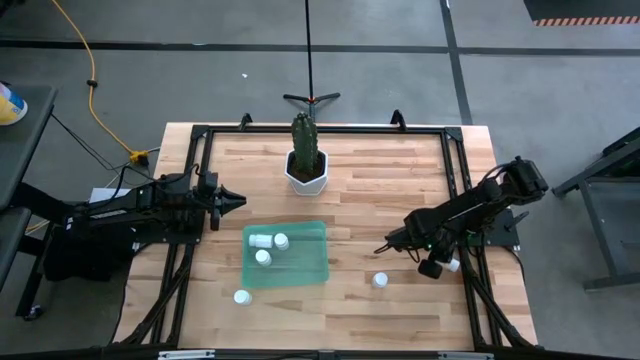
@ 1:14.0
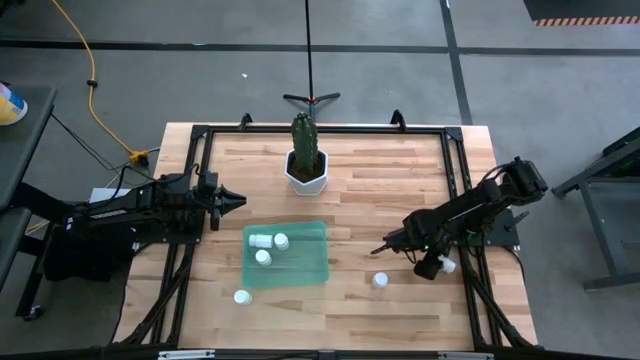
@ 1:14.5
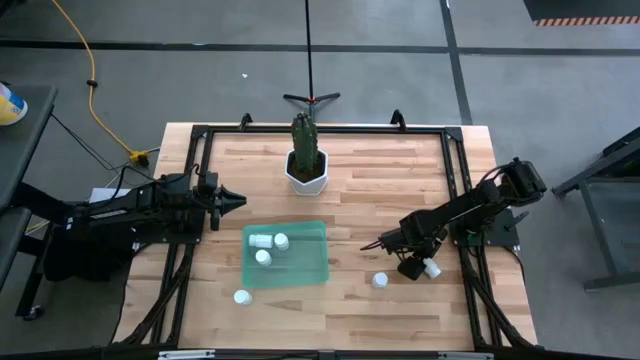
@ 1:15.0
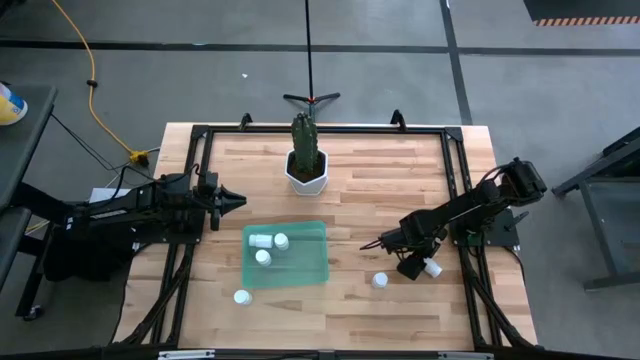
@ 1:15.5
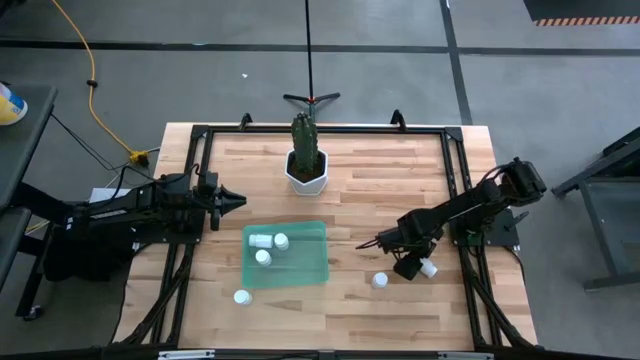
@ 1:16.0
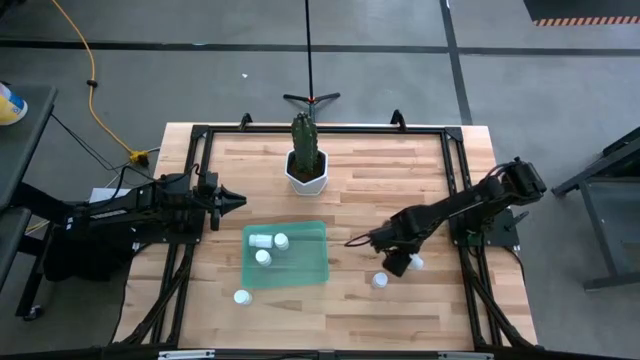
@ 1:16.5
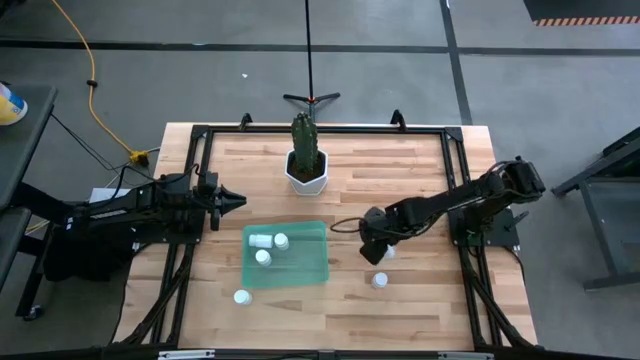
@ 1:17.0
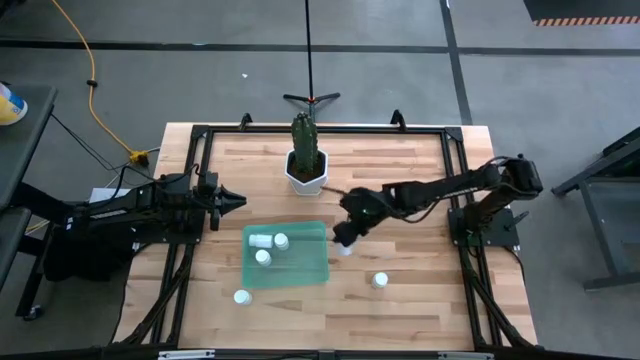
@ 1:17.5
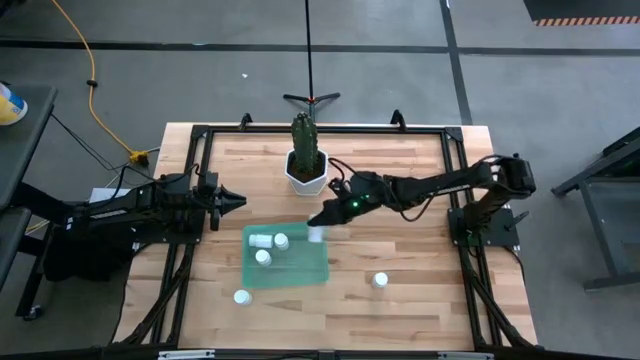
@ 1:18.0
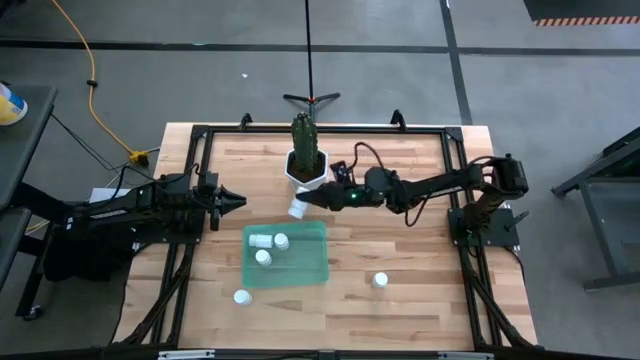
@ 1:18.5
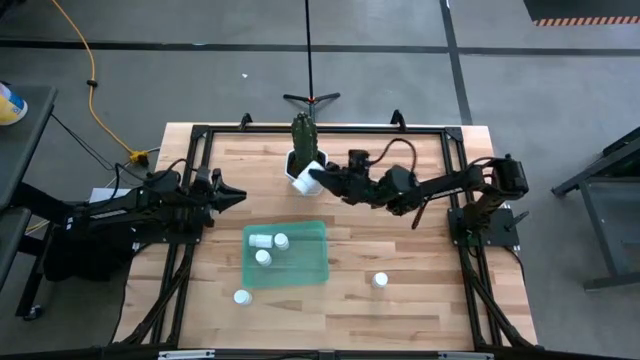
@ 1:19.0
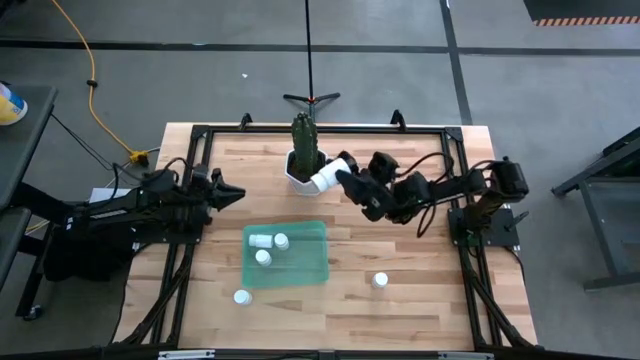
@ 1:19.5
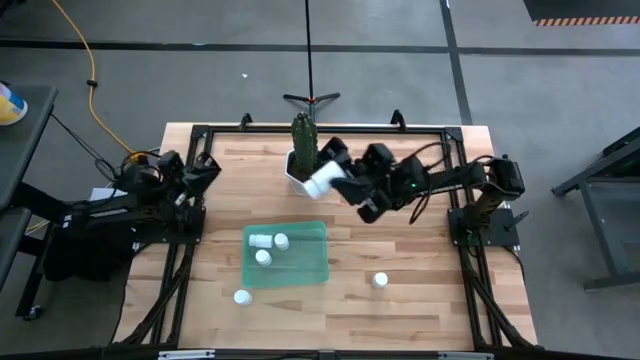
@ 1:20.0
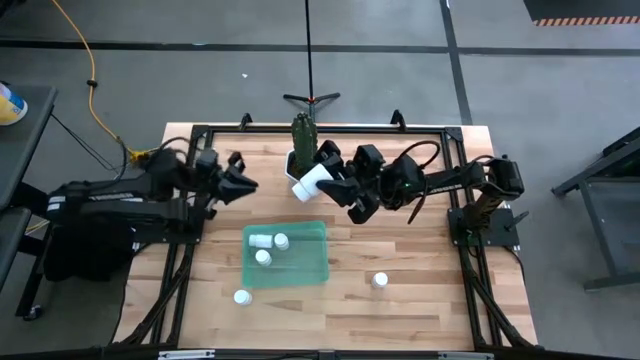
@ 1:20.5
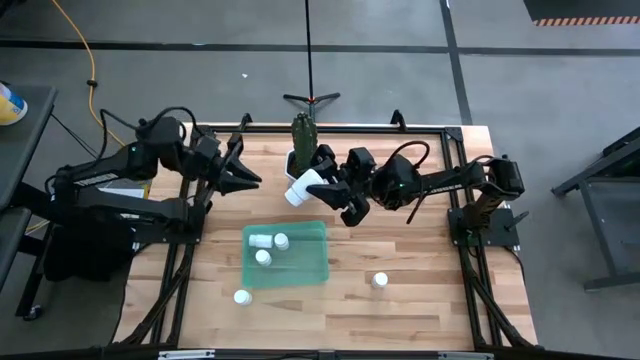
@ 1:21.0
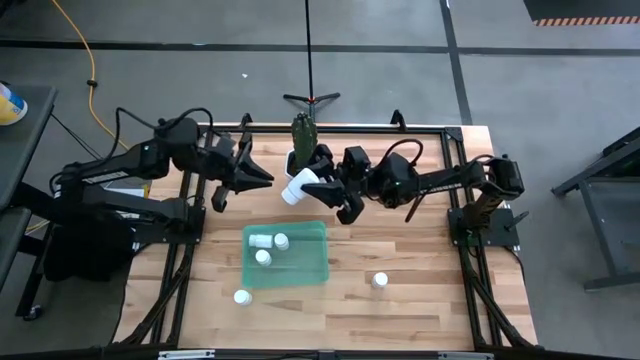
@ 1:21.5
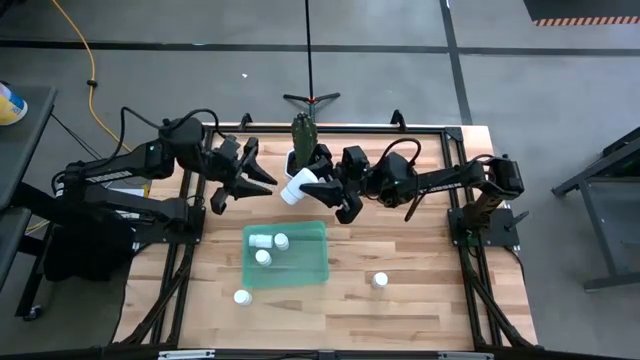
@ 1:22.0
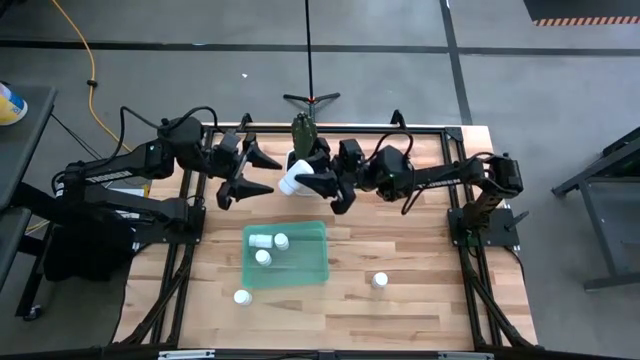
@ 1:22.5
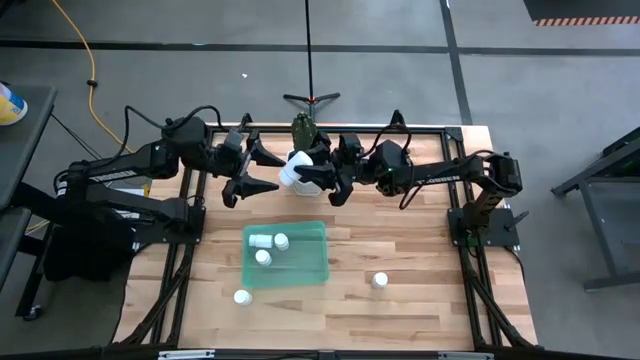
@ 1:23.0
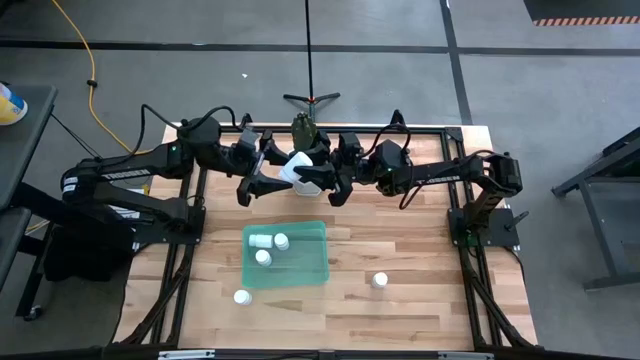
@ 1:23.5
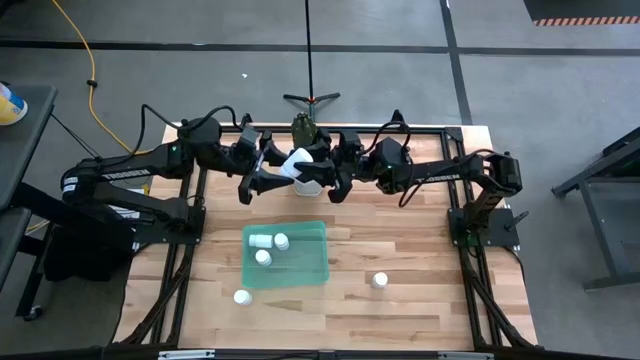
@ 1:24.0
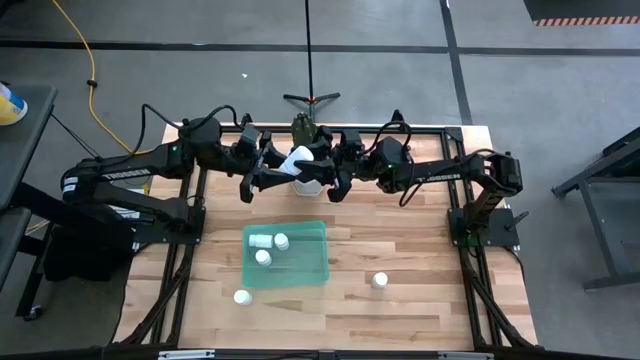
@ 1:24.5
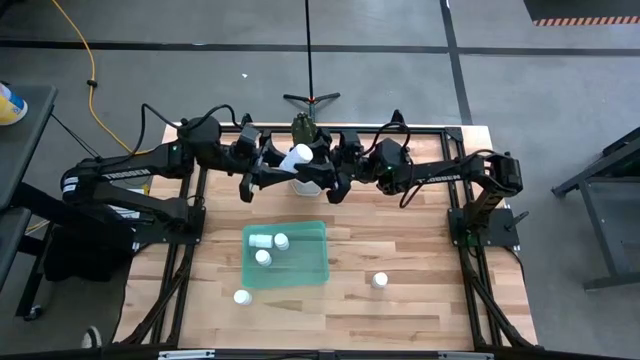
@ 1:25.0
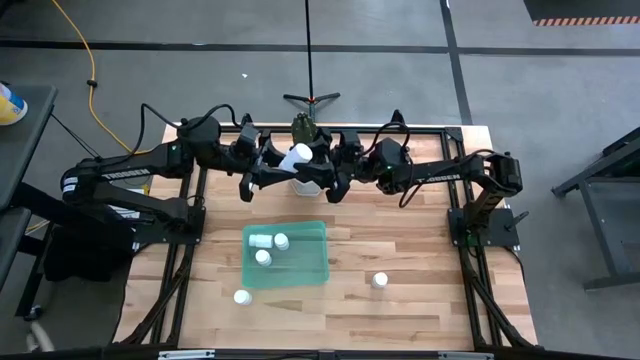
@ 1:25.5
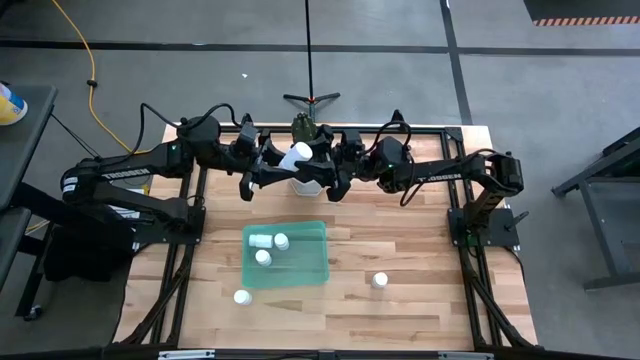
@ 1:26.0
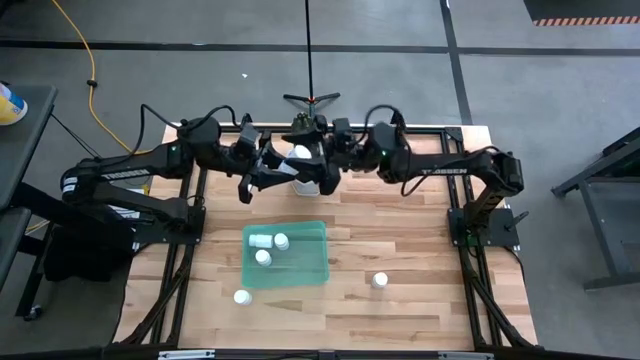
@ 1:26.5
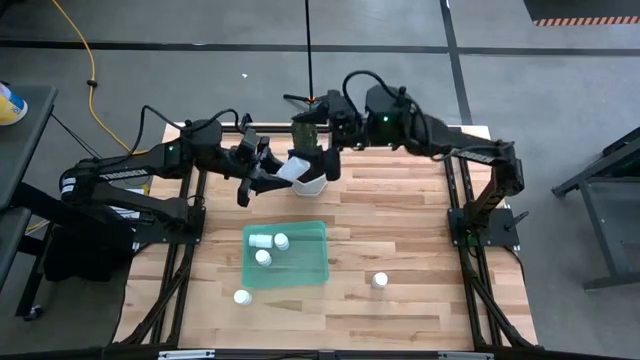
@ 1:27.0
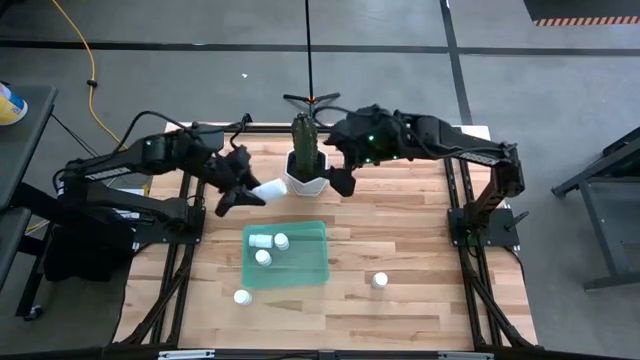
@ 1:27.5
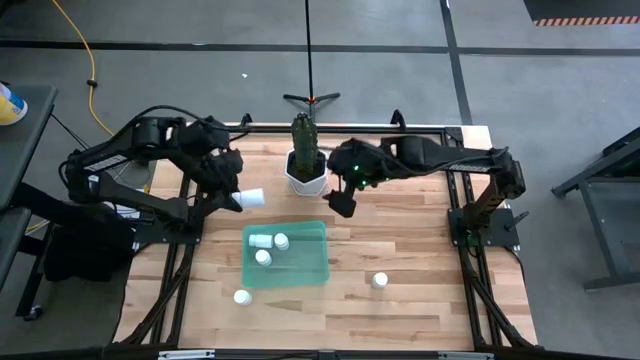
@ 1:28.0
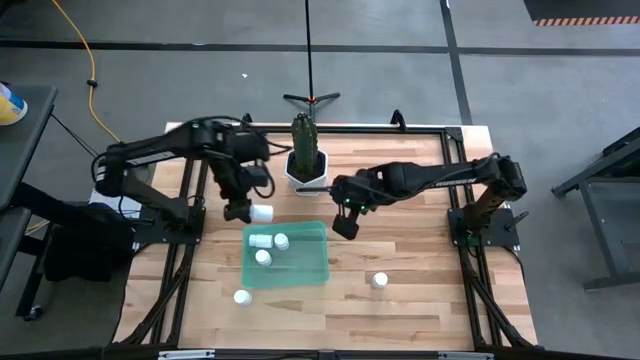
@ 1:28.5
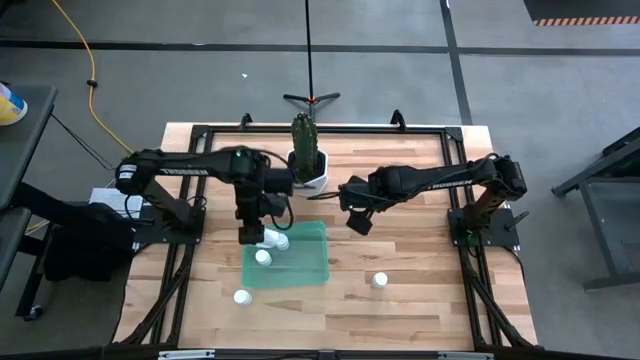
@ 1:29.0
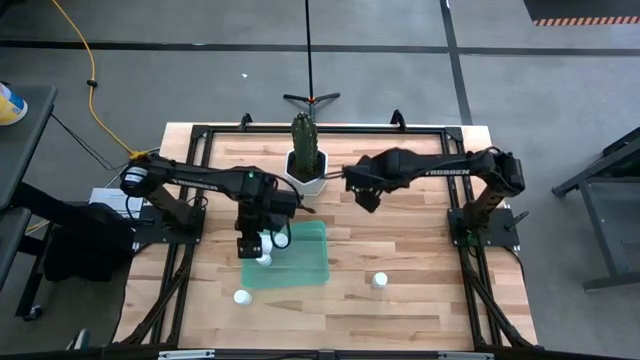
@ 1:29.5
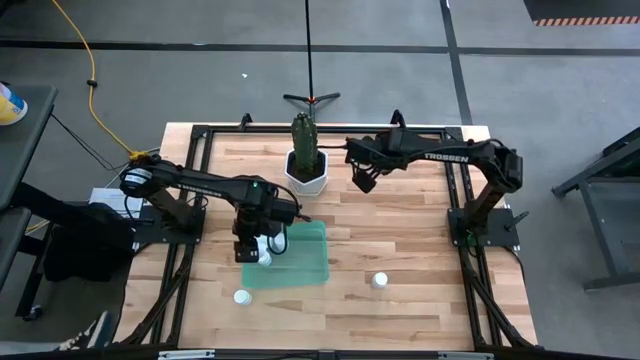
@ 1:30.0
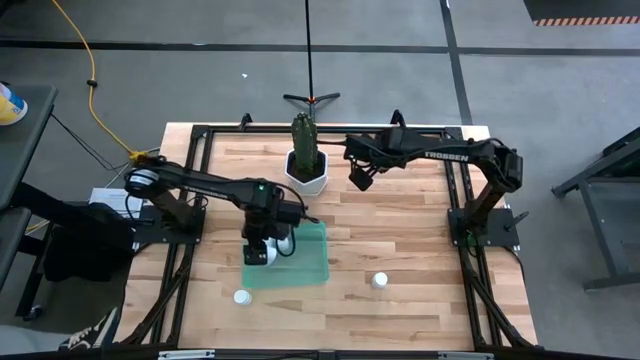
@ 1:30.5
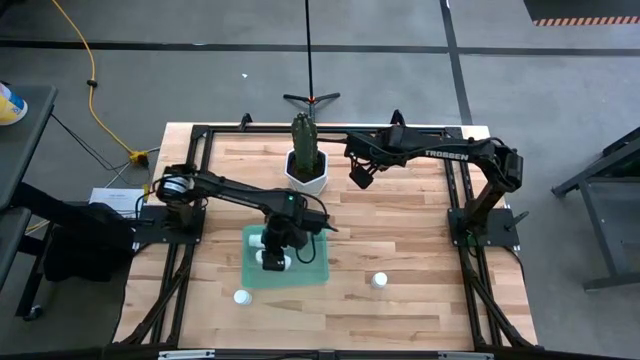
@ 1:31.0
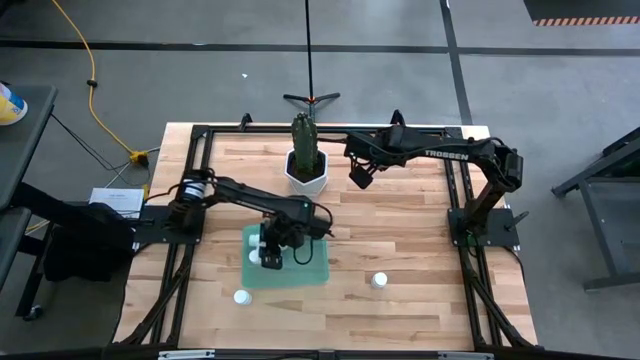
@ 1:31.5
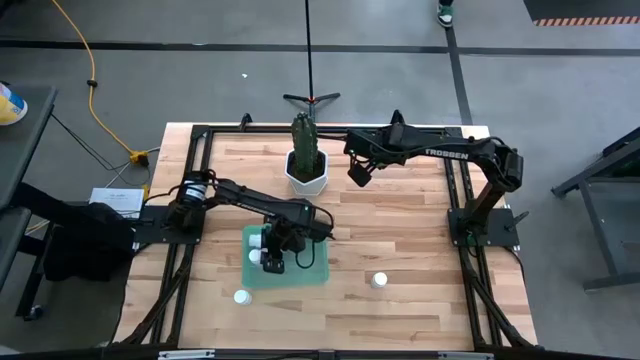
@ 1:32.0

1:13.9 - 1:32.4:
Task: Pick and place pill bottles into a basket
Put the white pill bottle into the green bin

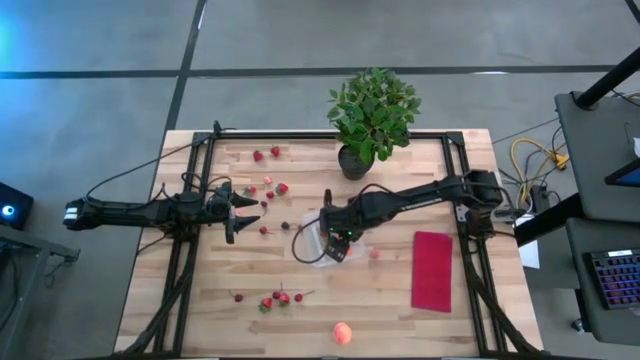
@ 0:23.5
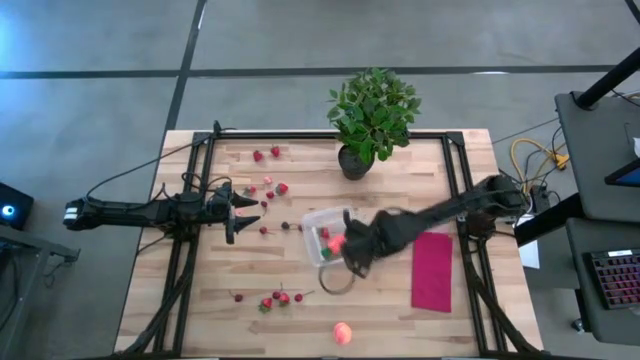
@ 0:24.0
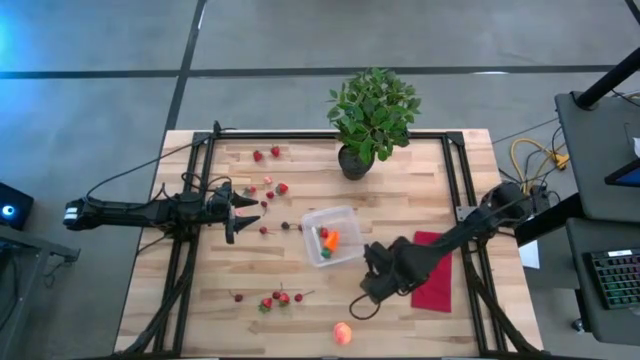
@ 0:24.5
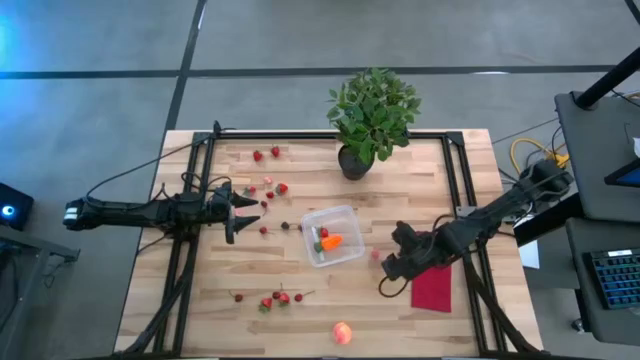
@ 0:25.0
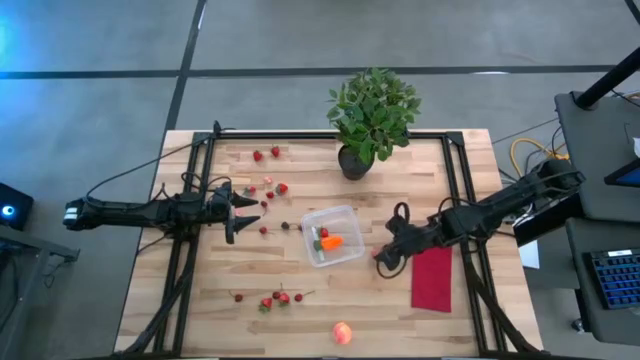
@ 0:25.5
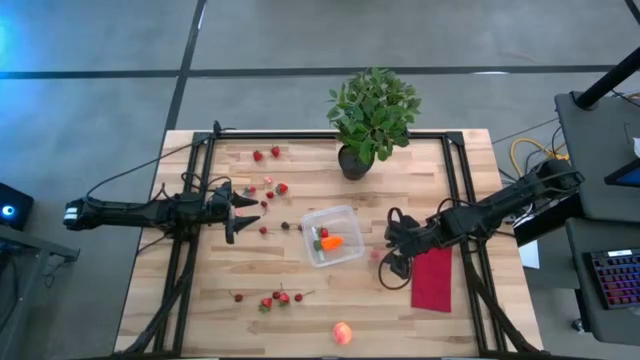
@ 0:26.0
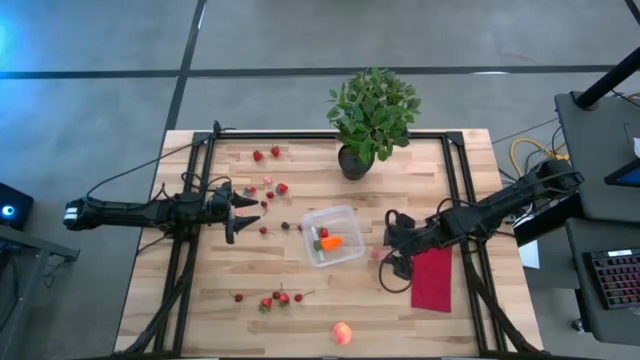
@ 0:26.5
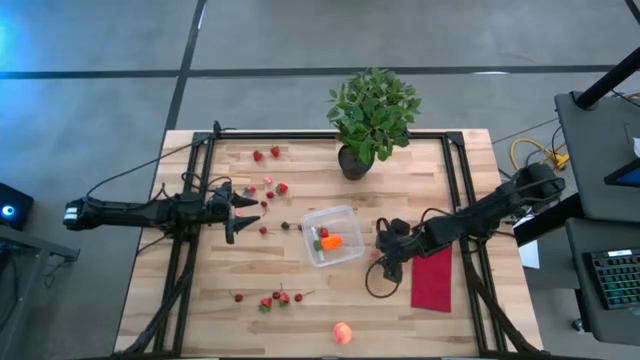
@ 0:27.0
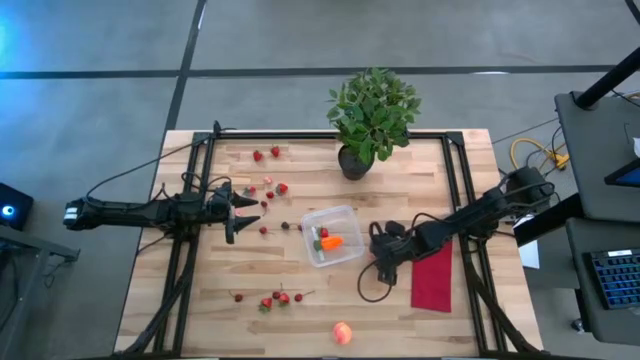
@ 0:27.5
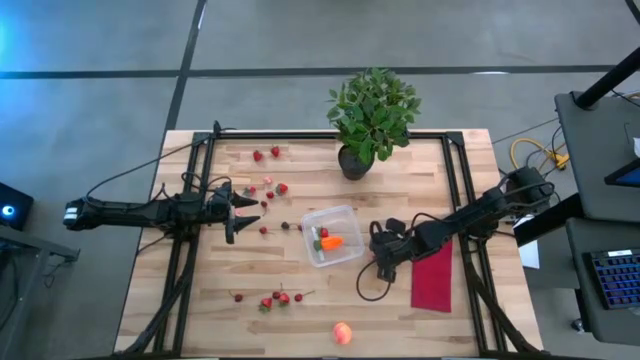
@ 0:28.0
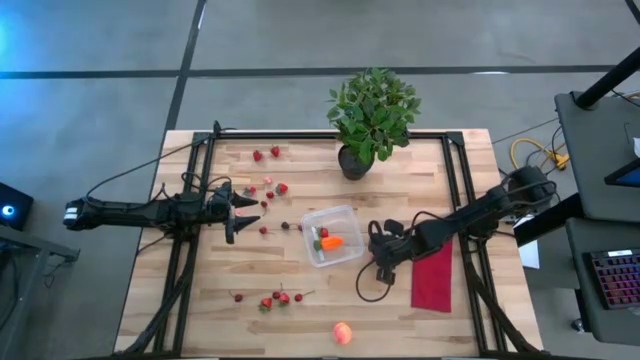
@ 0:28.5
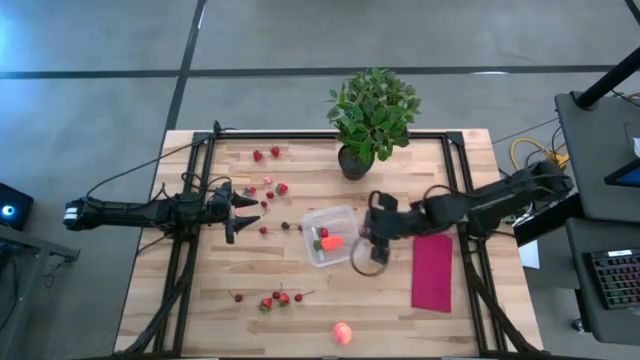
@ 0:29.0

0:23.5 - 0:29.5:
Task: Pick and placing Produce into tupperware
Put the pink peach into the transparent bin
